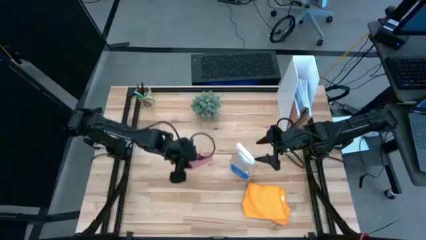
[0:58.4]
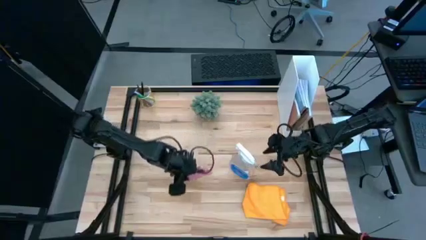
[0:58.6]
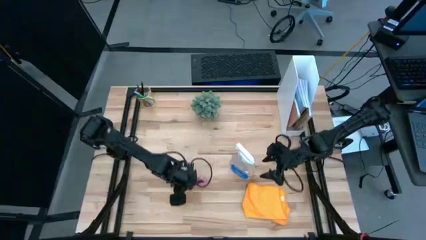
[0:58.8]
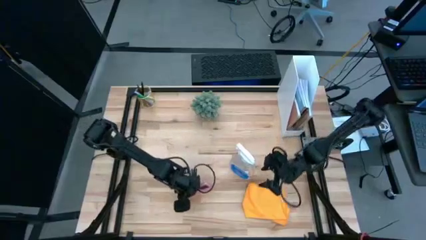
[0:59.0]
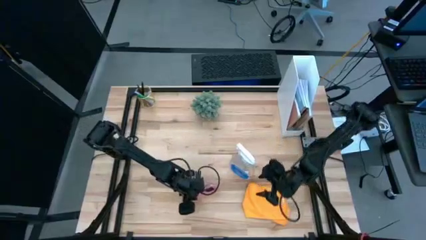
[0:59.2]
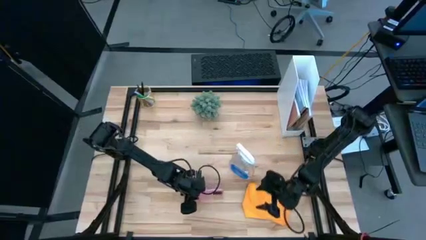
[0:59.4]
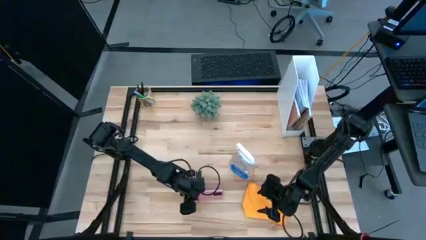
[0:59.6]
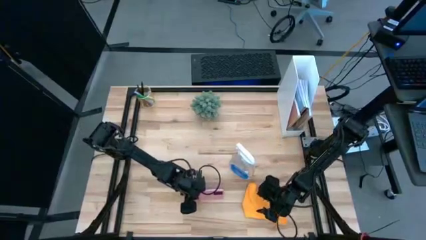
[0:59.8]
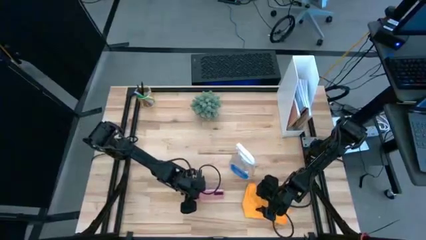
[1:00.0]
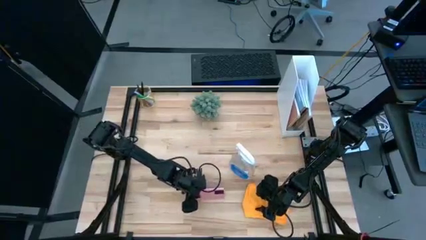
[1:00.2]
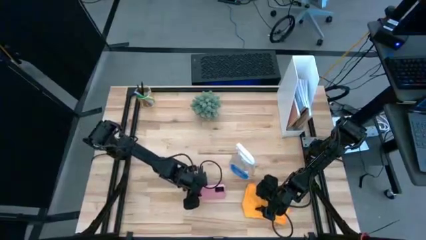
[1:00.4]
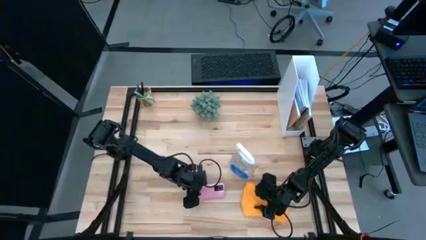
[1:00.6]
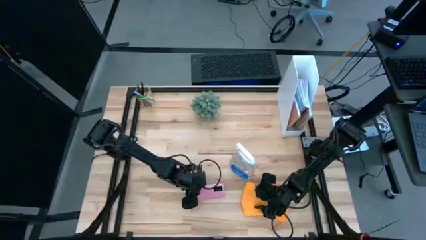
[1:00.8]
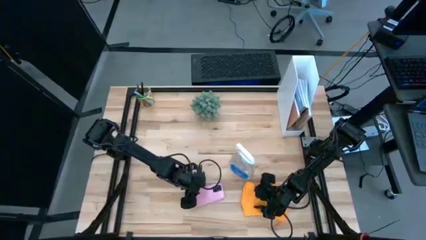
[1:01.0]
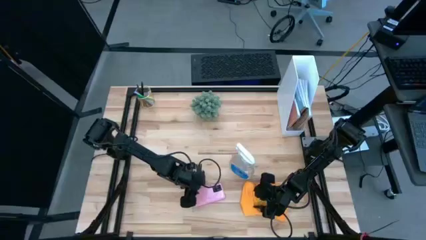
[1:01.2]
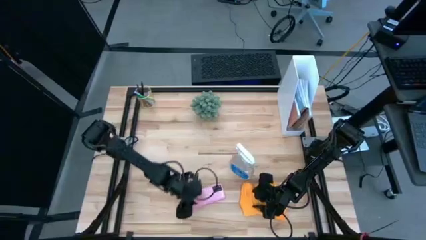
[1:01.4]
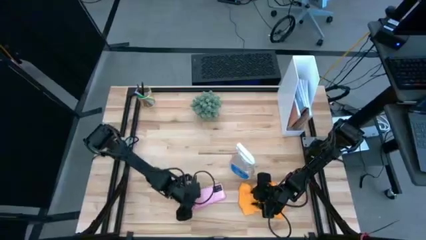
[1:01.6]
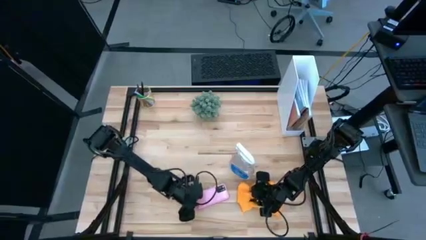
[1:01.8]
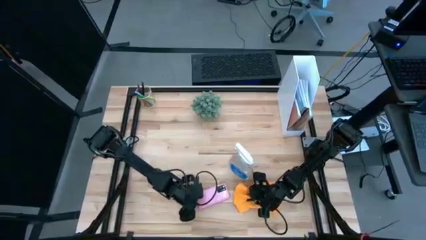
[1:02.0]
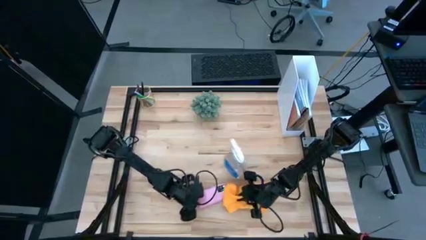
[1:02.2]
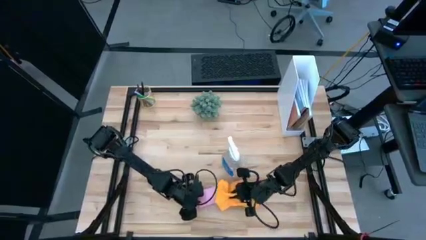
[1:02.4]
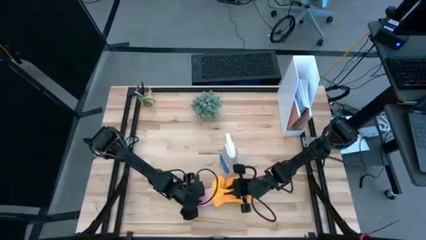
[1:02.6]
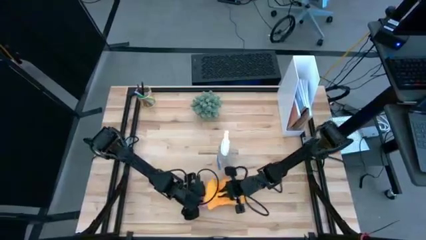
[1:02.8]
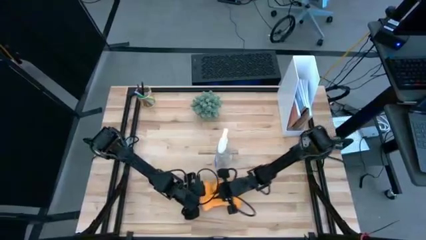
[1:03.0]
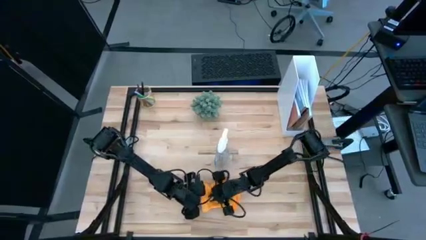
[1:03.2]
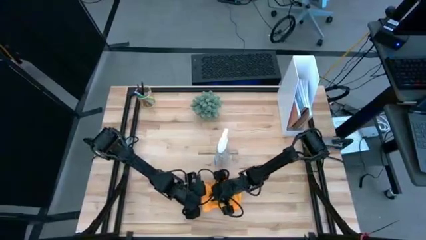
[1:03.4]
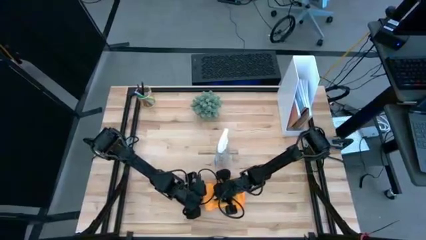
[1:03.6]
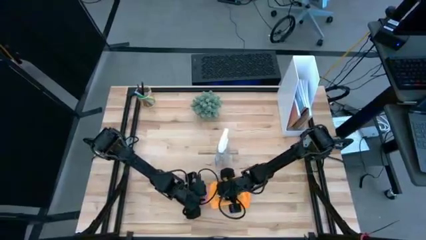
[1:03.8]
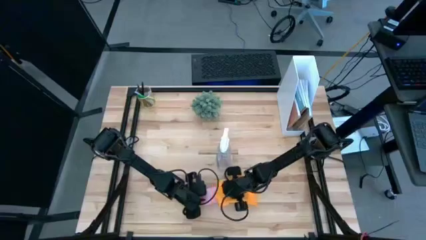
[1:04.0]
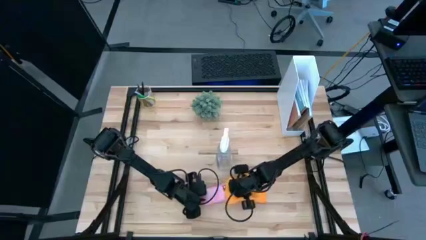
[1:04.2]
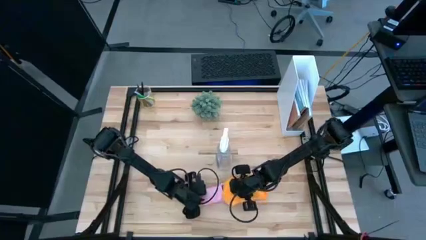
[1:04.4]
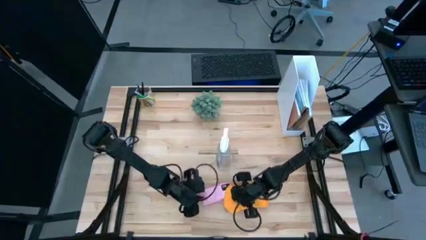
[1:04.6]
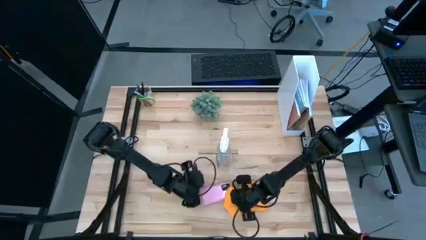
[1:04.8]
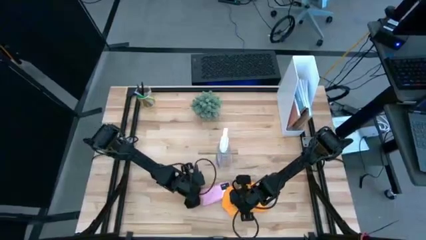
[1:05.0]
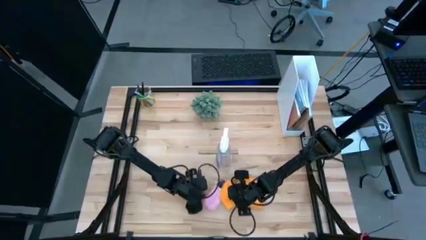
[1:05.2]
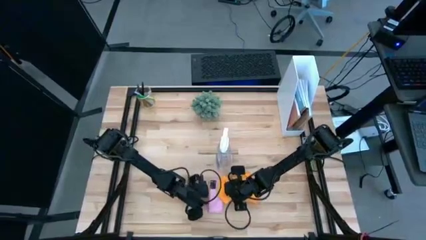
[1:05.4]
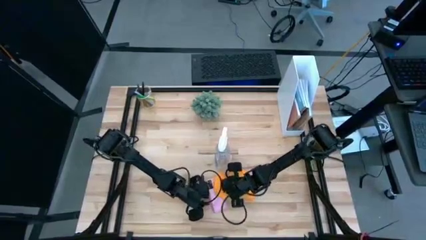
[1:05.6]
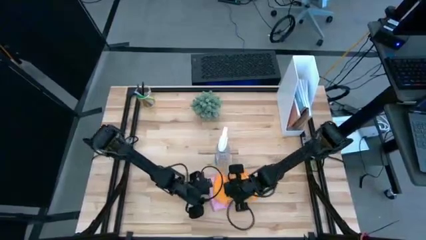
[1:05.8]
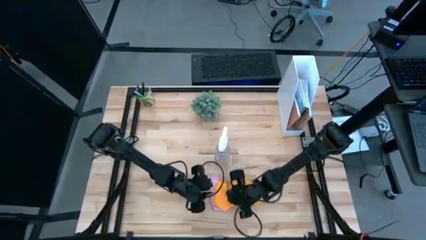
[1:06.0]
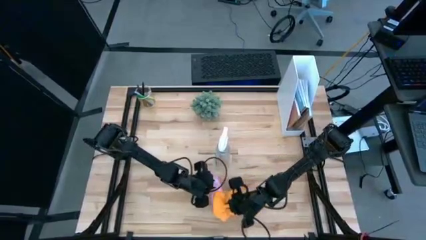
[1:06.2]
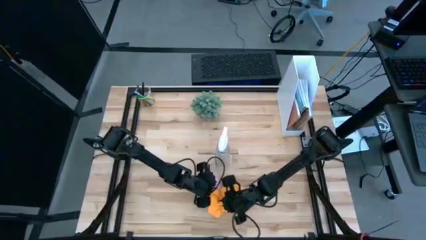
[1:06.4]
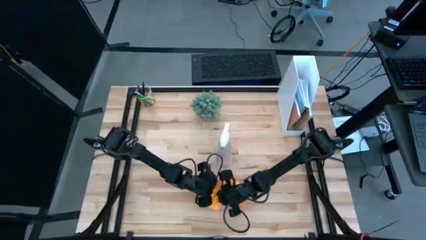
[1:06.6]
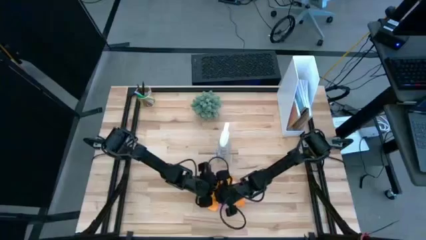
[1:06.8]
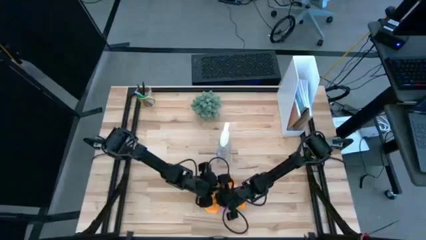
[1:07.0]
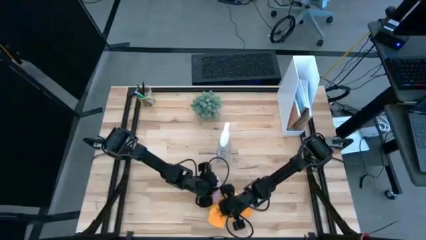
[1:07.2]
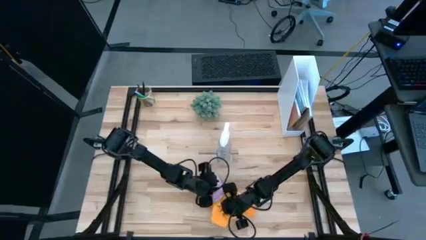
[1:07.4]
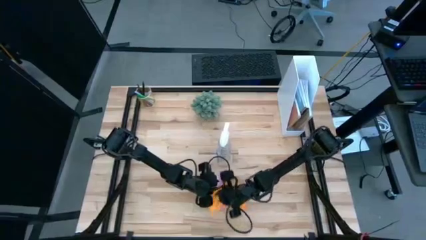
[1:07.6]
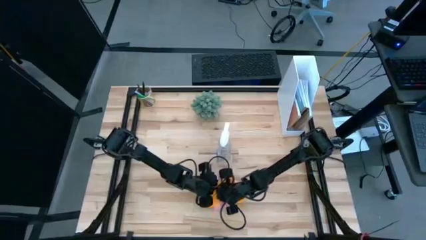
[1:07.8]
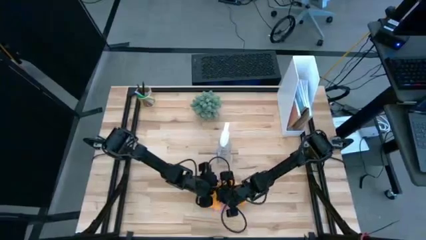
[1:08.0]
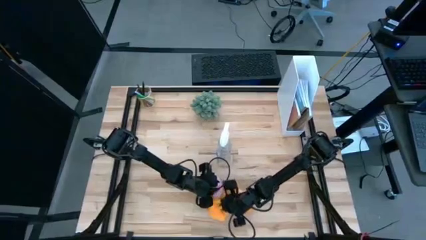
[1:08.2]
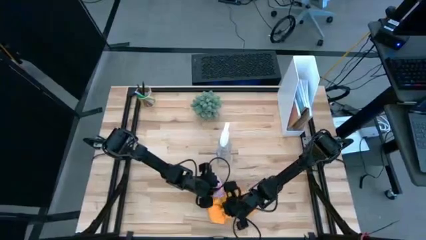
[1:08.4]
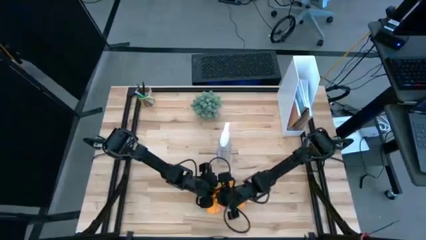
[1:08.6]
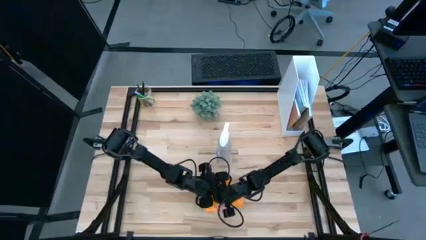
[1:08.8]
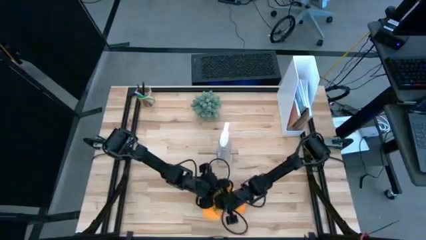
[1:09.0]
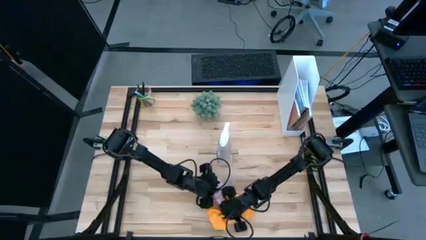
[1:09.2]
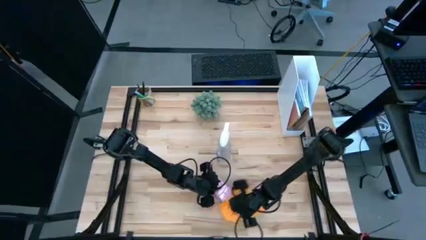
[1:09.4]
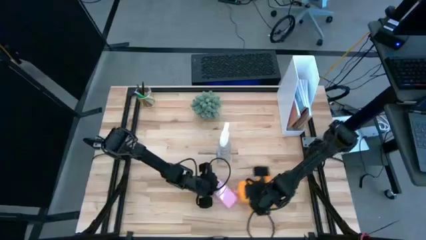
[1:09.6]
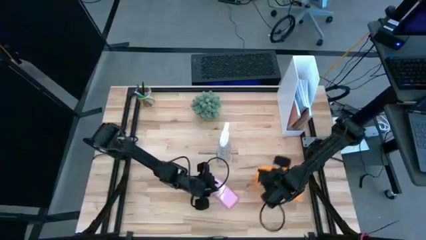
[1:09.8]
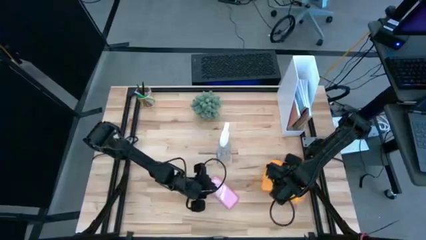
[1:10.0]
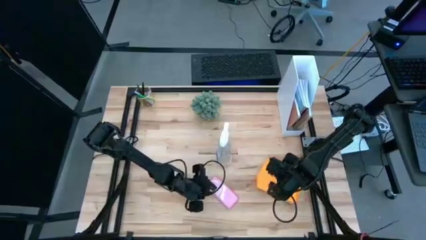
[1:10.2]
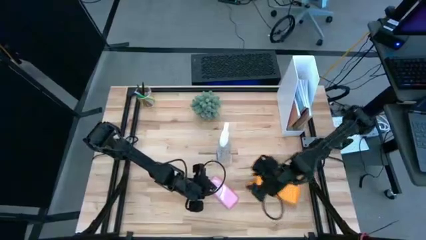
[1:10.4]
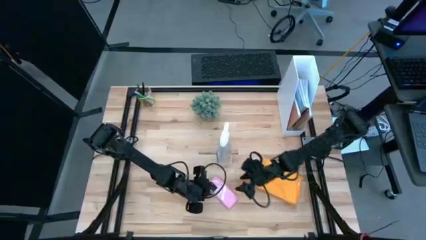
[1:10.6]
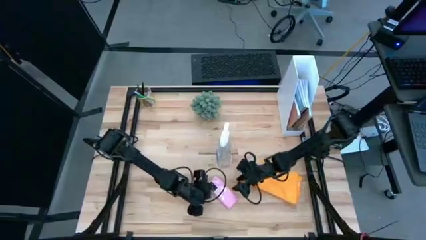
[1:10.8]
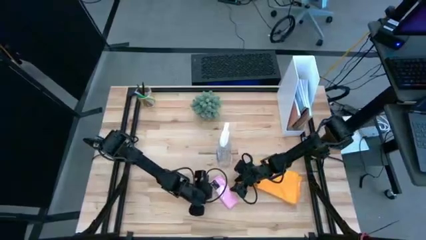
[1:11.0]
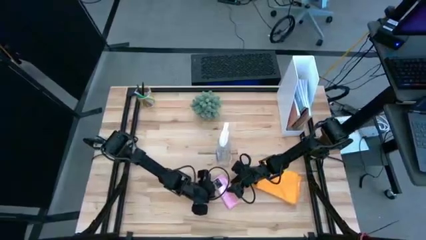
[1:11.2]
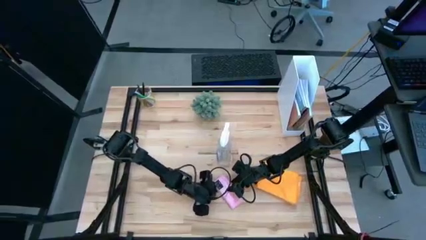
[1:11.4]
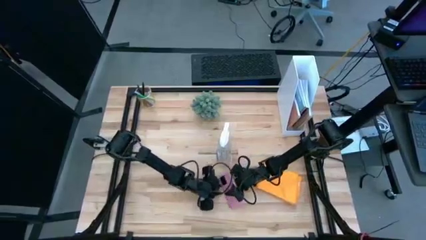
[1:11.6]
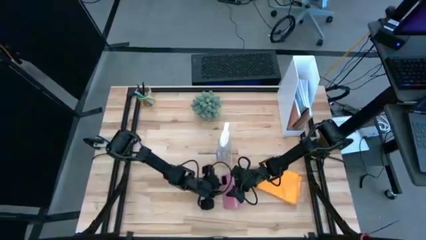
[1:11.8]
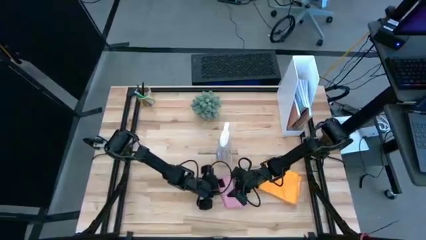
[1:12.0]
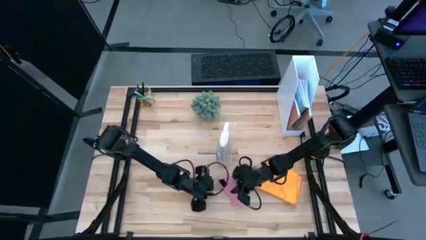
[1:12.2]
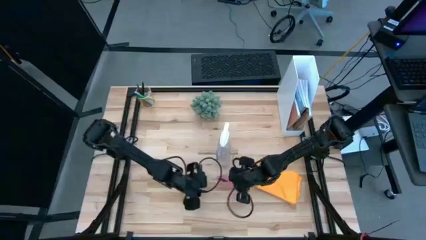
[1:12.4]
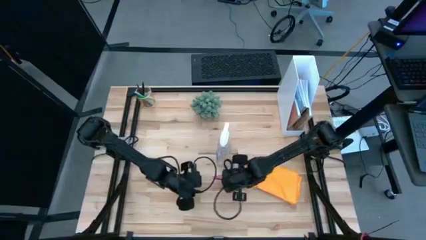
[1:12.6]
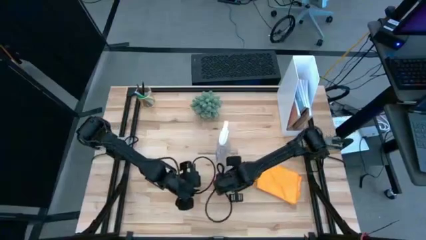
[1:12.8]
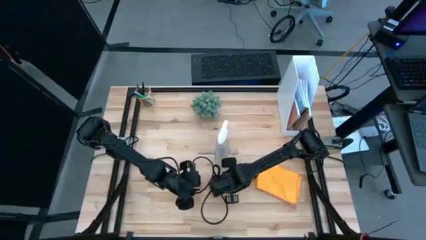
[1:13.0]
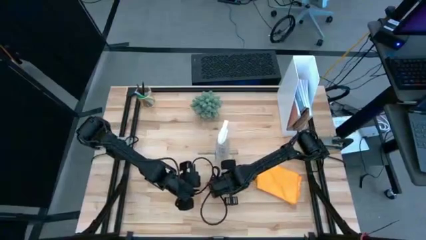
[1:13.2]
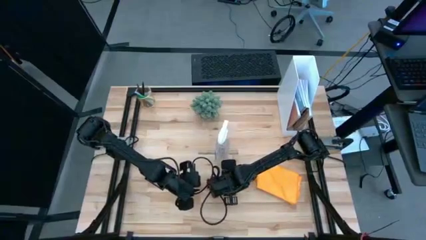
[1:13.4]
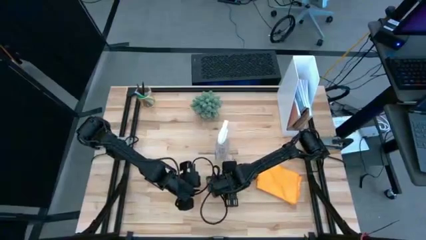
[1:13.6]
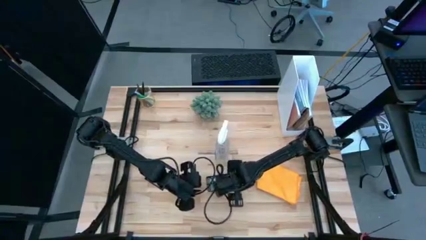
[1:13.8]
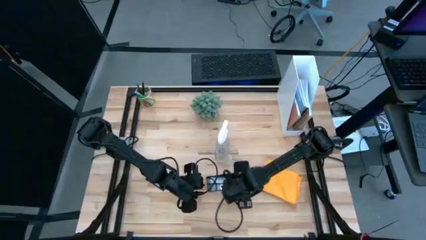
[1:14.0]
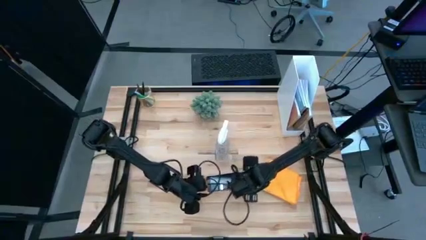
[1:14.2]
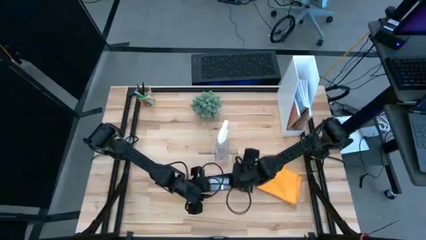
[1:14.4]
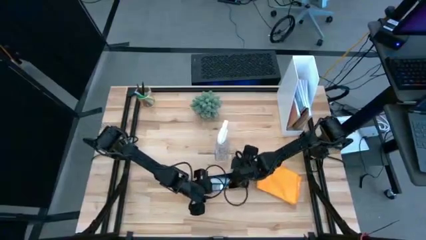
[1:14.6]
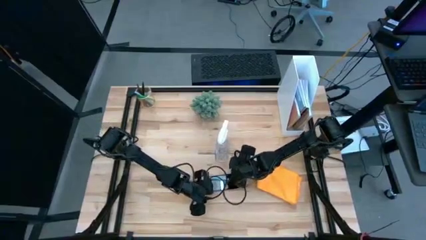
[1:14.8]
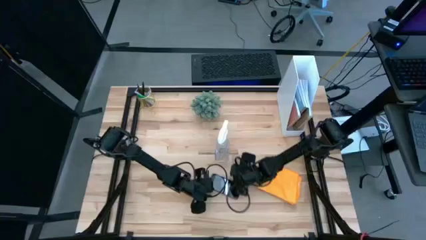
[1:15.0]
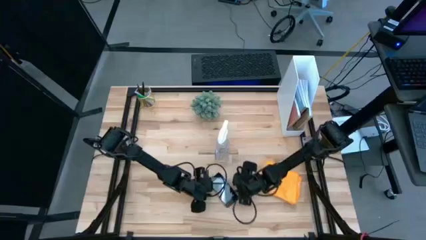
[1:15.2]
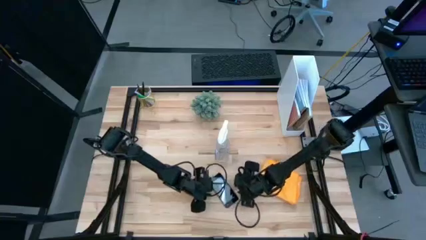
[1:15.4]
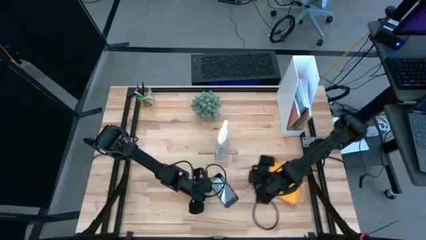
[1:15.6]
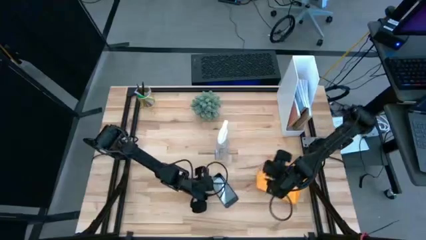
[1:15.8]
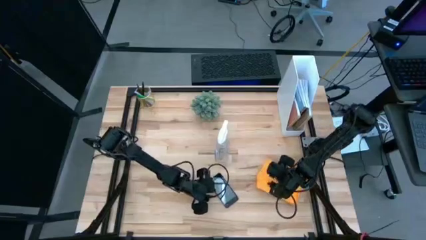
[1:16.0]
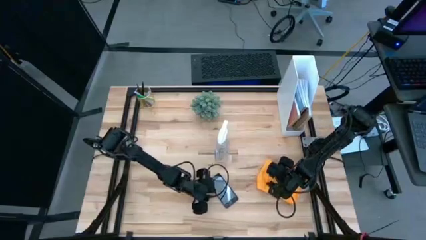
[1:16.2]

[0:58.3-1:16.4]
Task: Apply microfiber cloth
Wipe the cellphone with the microfiber cloth
